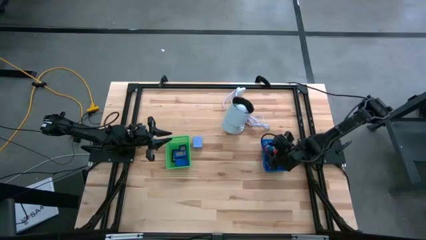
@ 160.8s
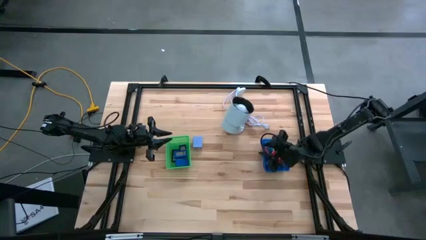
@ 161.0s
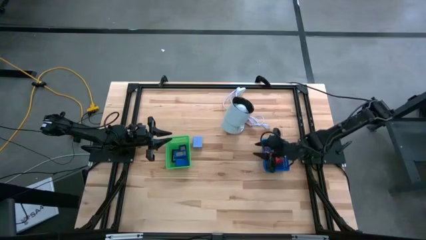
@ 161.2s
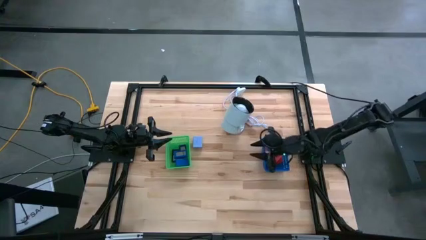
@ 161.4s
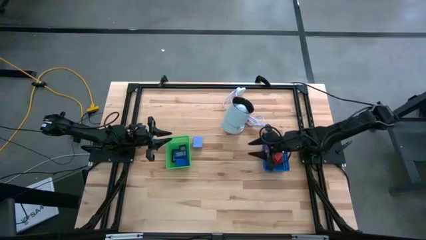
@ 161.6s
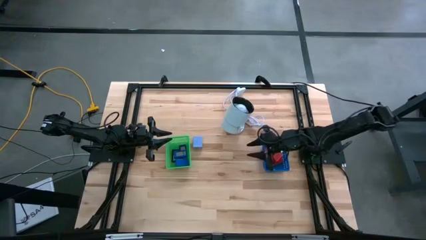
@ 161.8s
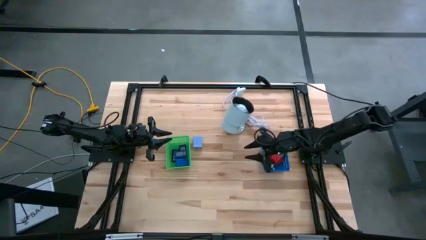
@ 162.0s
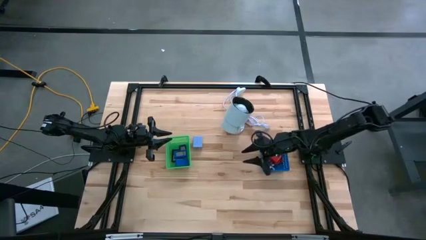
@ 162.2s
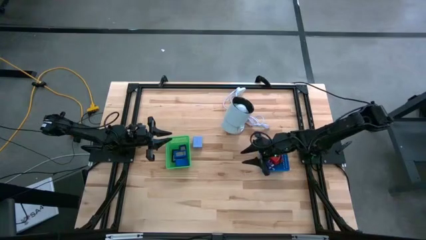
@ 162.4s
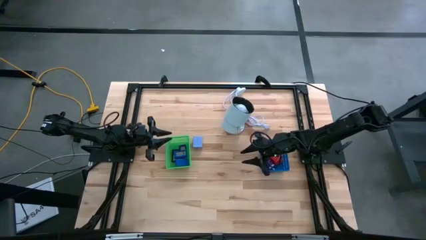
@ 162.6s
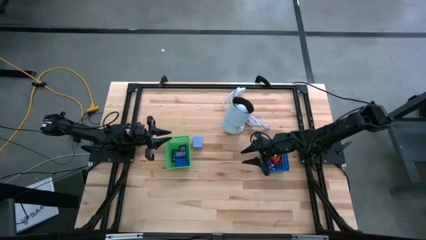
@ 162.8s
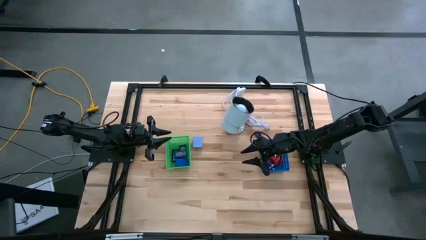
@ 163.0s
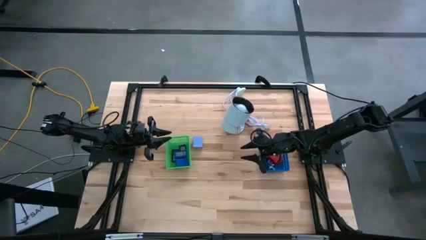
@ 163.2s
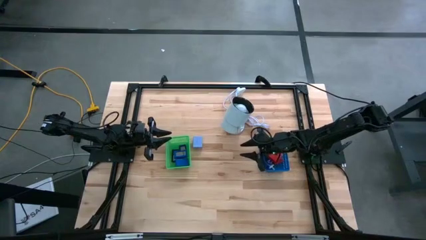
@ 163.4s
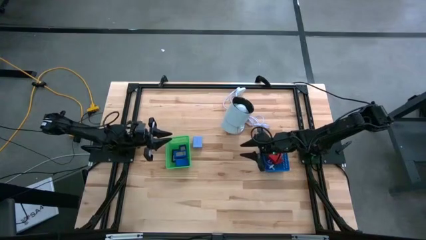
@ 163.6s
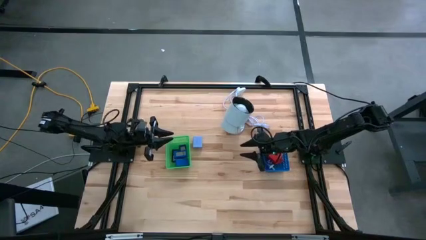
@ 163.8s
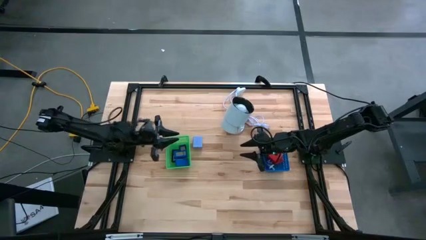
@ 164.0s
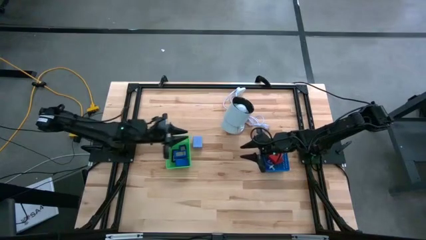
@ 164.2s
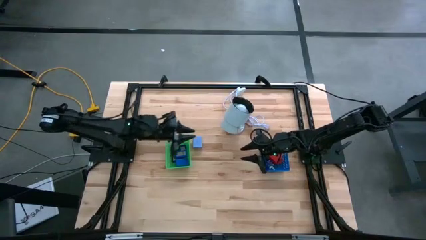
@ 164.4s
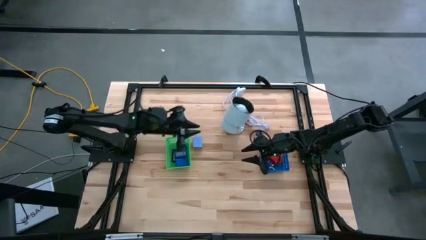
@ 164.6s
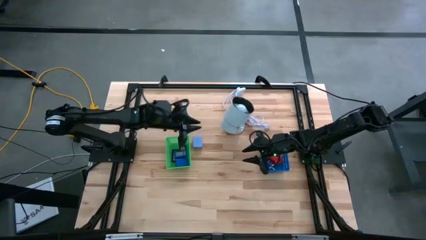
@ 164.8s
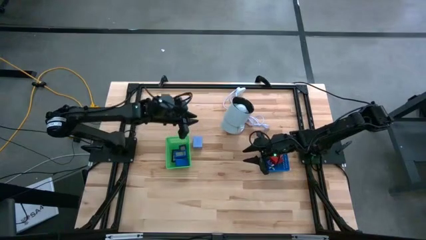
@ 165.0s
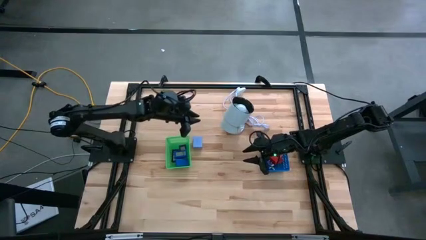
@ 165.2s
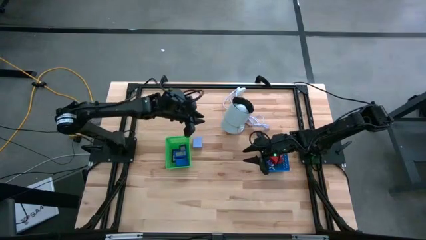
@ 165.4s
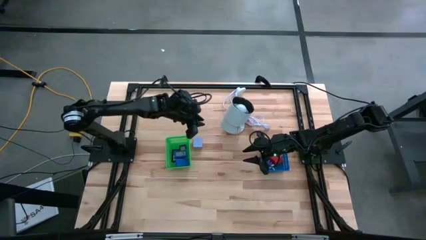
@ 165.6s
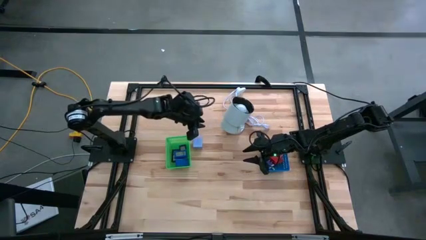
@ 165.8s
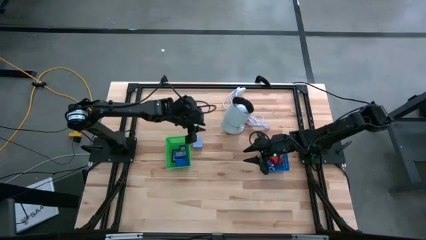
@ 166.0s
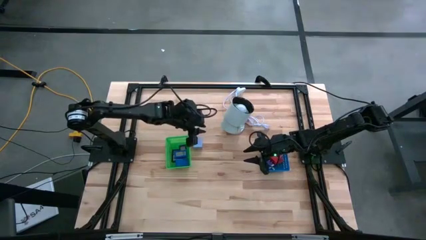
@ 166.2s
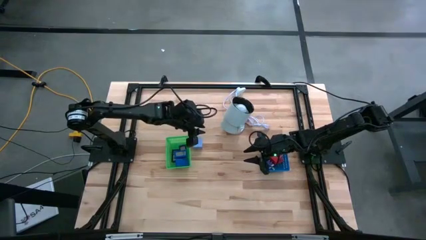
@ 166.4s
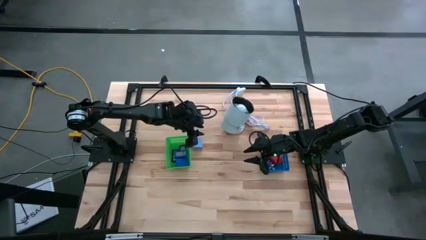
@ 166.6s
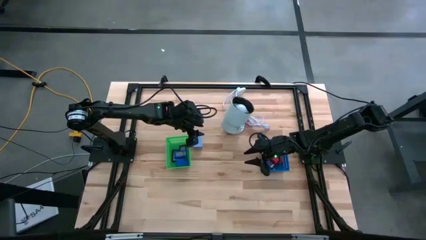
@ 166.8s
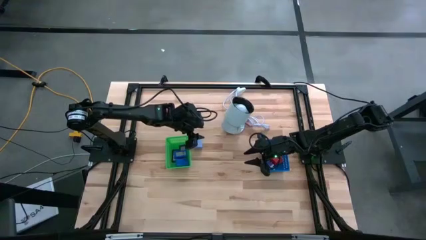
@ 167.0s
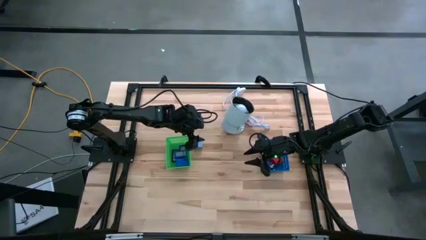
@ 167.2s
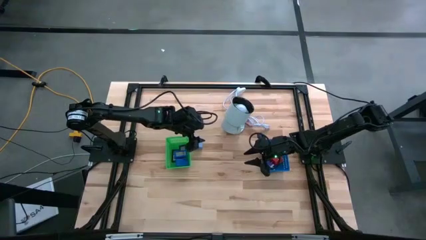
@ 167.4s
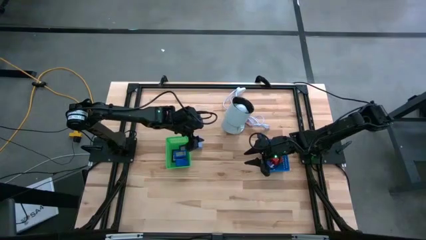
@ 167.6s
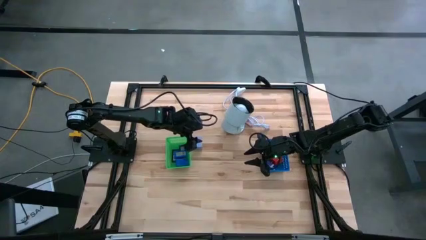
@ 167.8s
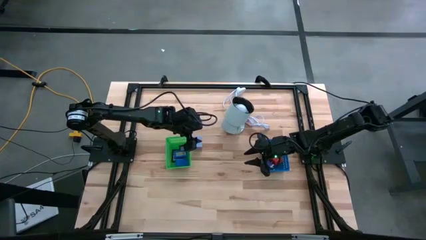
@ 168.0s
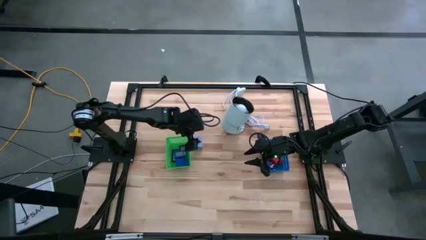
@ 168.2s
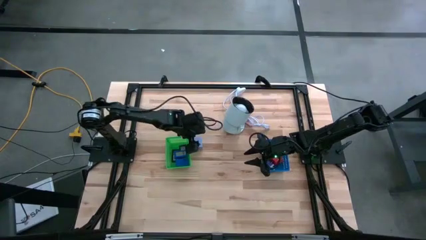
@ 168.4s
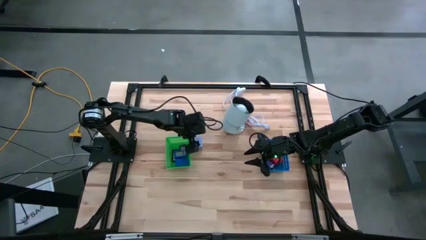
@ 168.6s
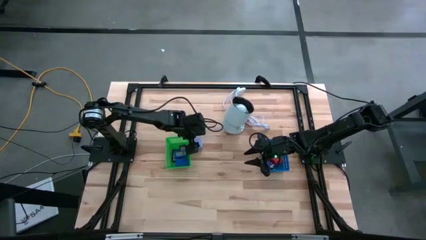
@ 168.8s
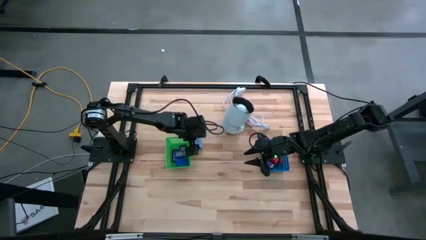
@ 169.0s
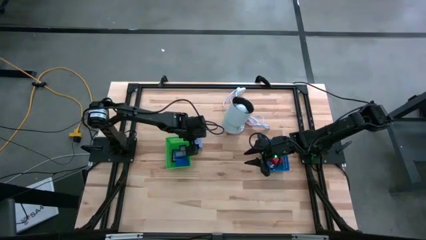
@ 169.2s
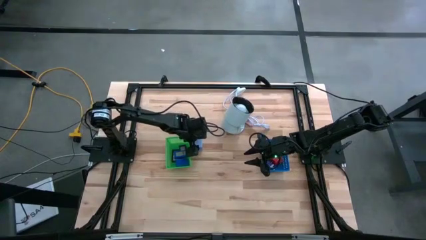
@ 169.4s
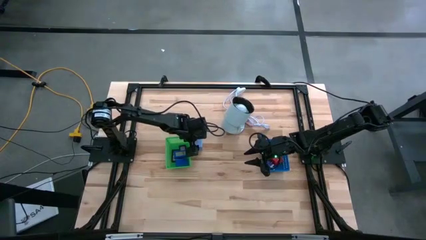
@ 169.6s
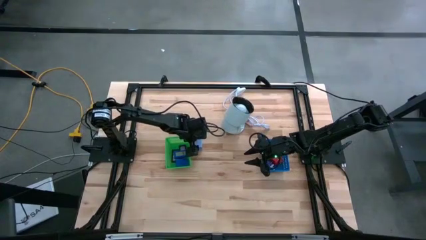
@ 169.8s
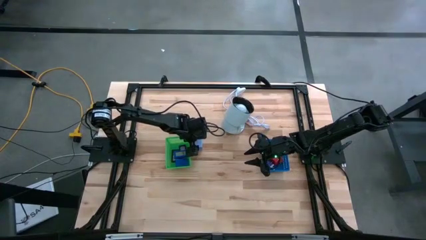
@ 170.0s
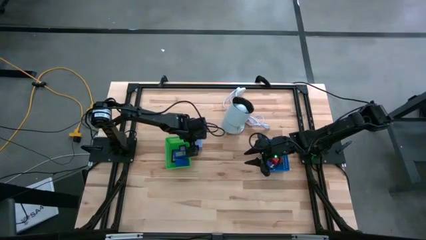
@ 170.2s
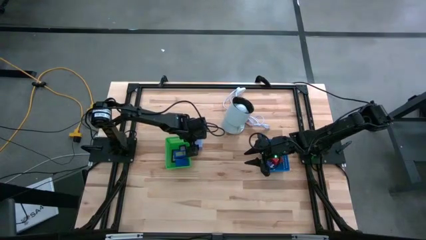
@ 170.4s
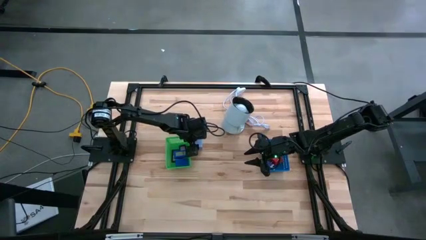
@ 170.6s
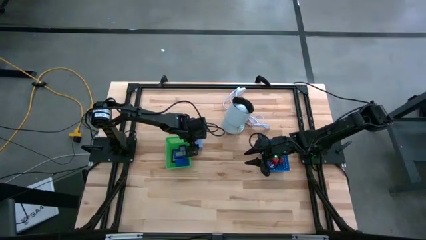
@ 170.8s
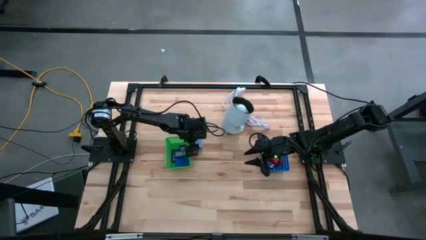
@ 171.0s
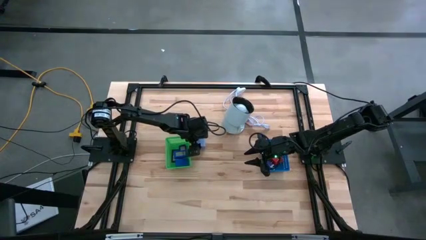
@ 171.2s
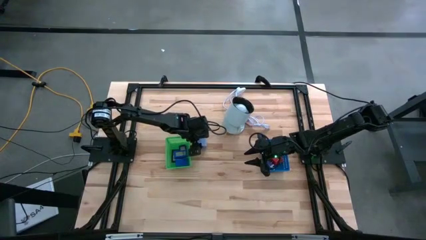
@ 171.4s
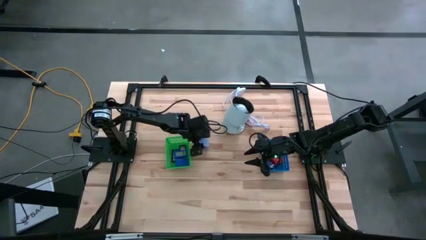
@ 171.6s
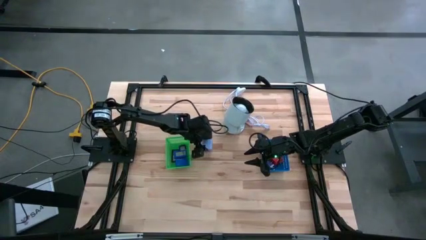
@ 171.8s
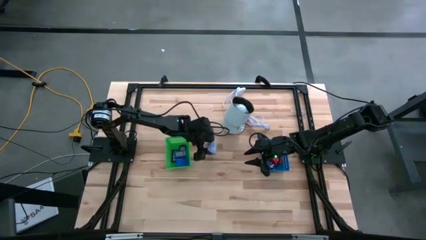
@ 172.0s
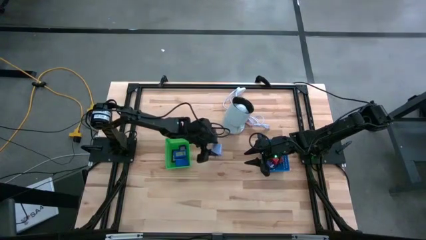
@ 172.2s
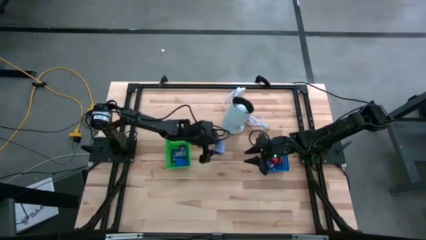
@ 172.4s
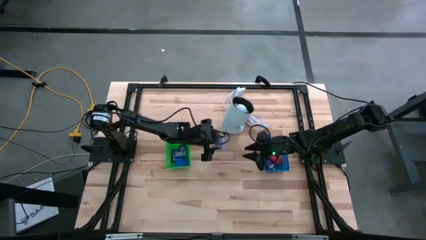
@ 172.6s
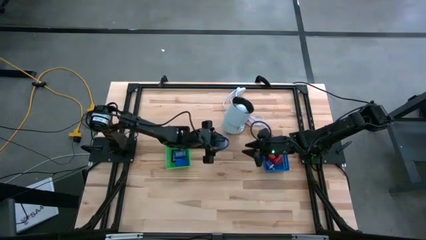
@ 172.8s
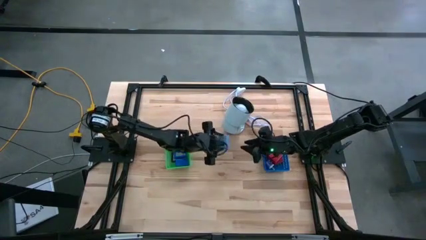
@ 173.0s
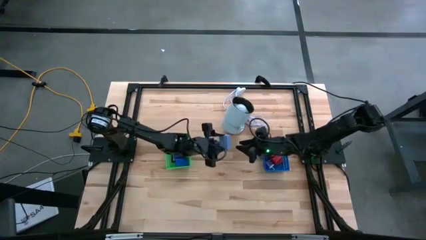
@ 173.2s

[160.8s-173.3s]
Task: Pick & Place Office items
Put the purple charger adapter into the blue bin

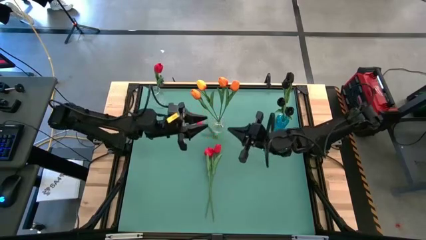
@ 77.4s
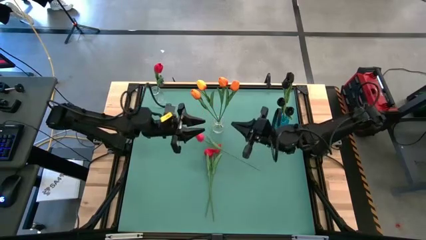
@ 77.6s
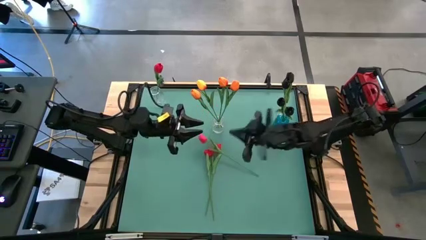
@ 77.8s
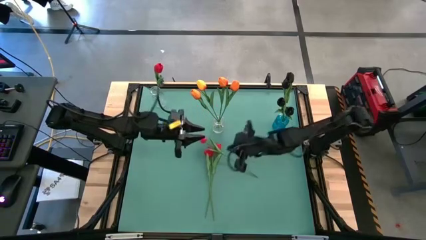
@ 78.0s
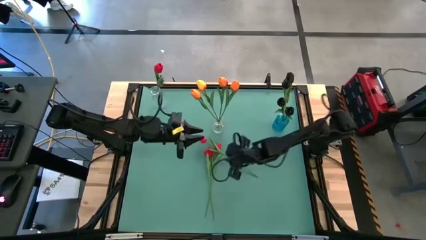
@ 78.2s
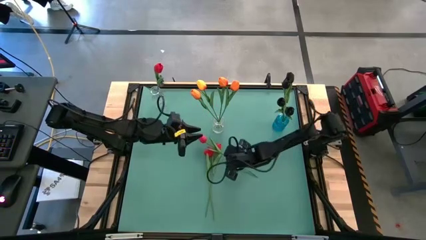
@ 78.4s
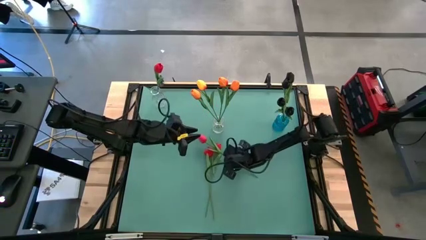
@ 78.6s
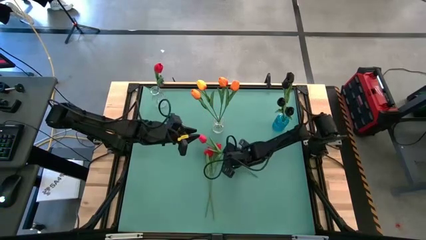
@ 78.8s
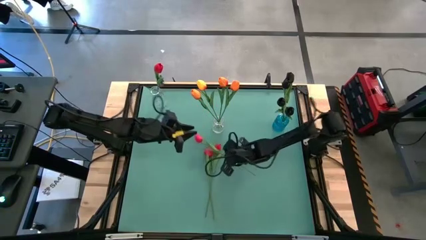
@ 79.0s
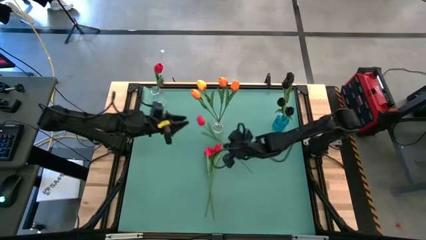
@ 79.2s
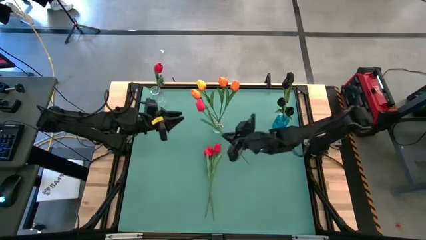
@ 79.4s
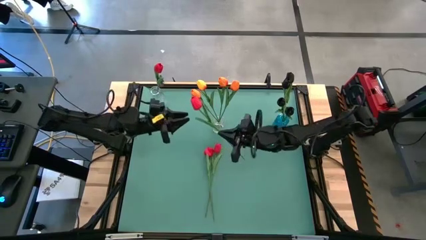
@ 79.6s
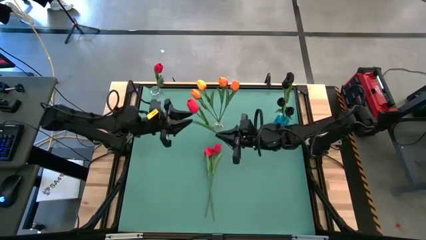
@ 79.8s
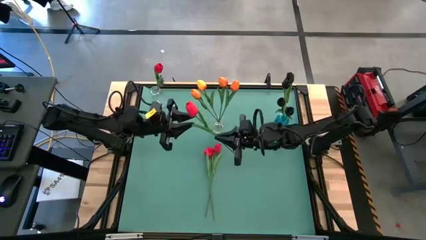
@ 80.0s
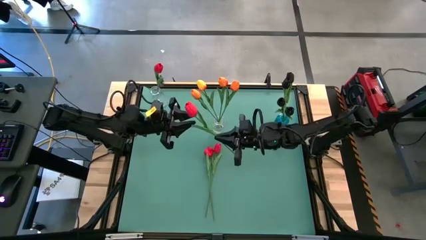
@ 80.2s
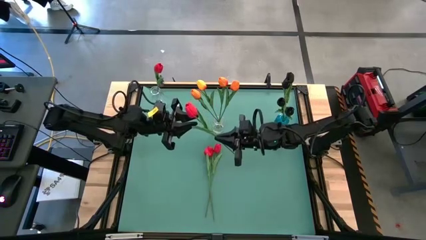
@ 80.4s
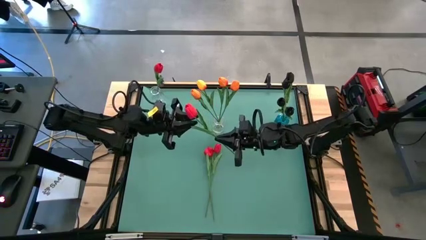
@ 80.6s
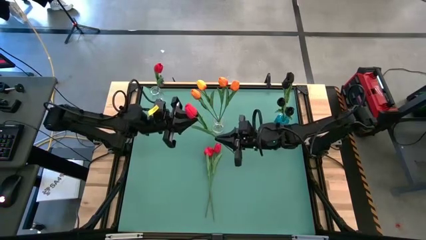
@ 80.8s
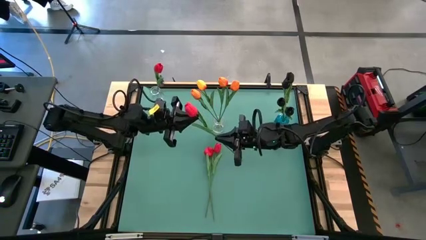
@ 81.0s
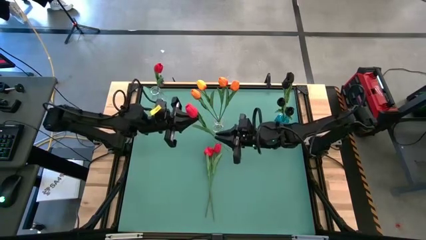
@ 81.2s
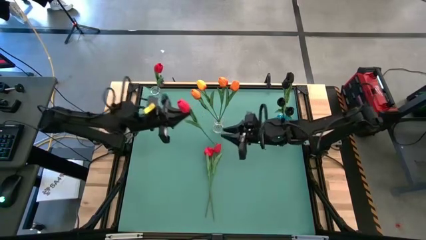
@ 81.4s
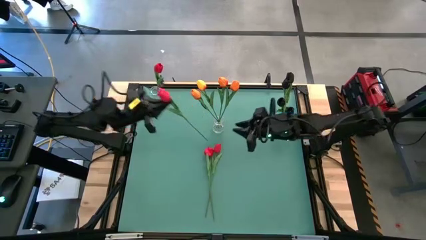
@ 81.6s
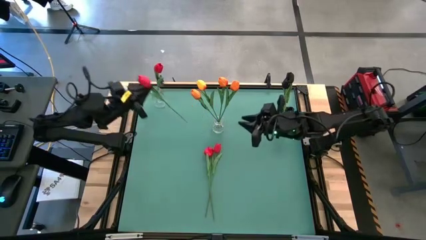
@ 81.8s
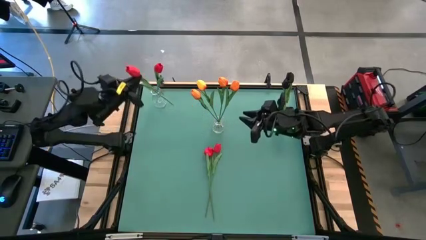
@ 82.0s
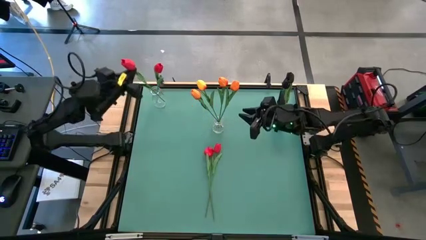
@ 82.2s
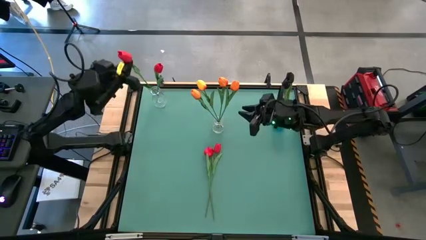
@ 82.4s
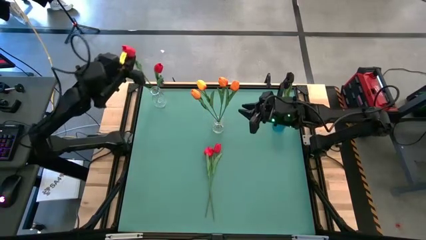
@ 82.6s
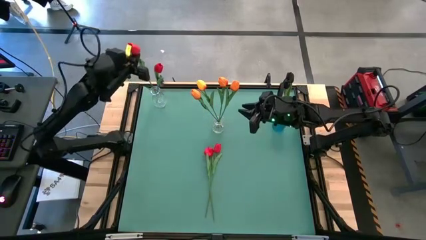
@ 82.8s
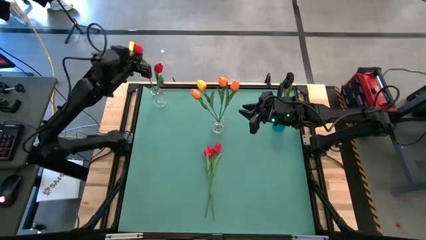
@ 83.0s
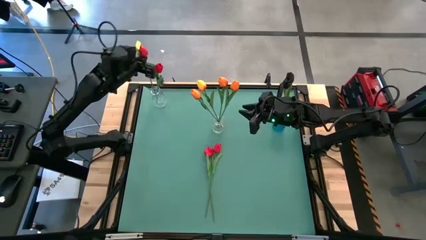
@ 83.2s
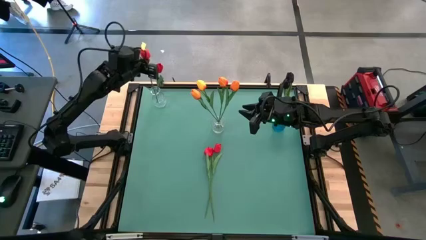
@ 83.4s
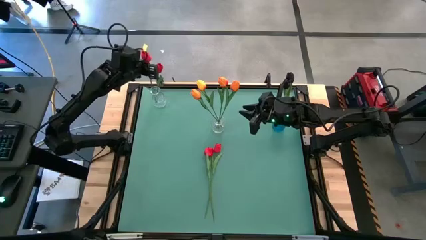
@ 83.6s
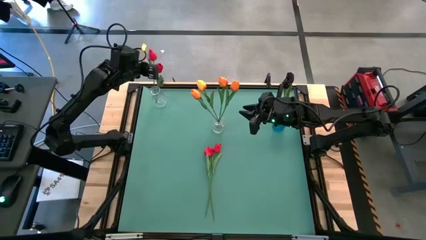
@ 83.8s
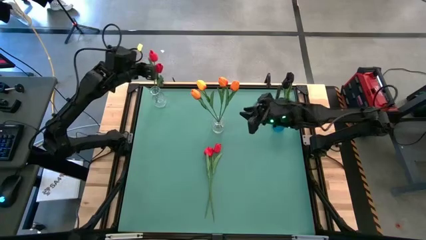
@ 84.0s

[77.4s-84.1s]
Task: Sort flowers into vase by color
Put the pink tulip into the top left transparent vase
